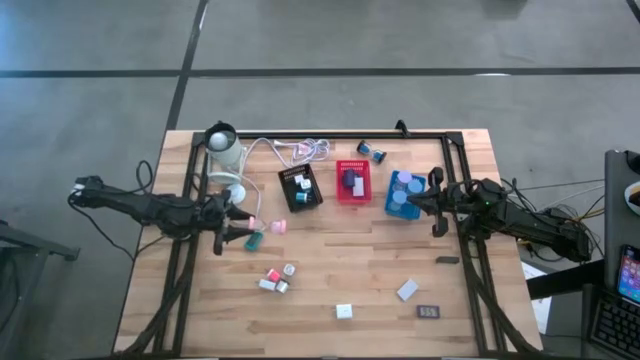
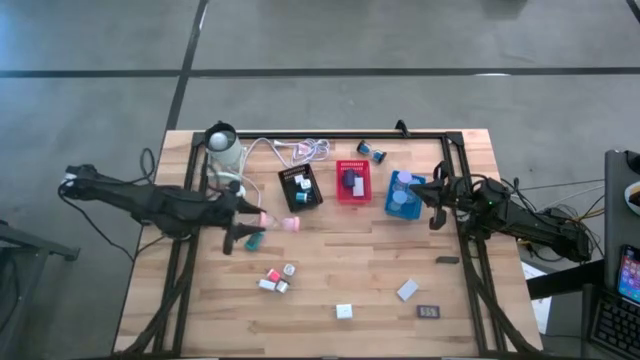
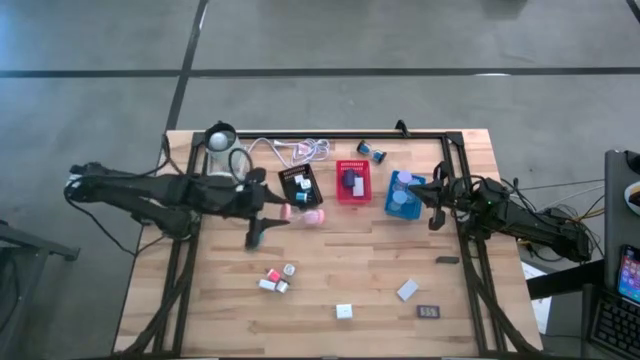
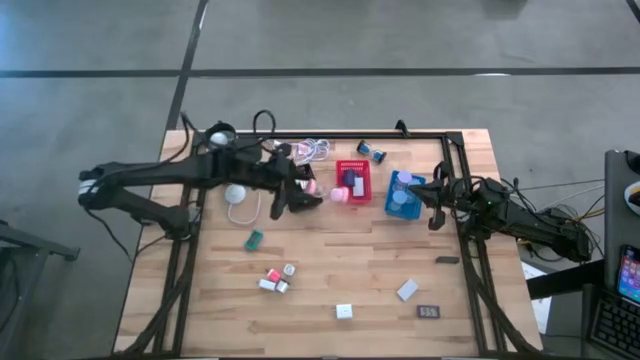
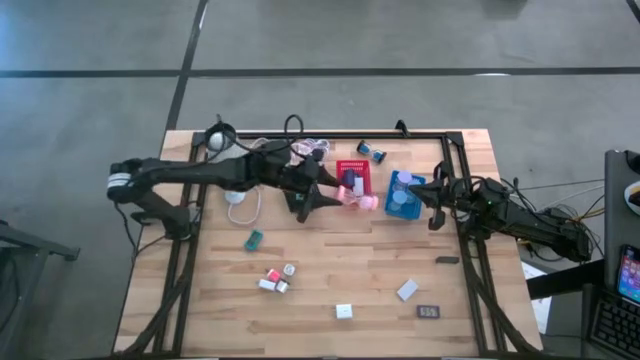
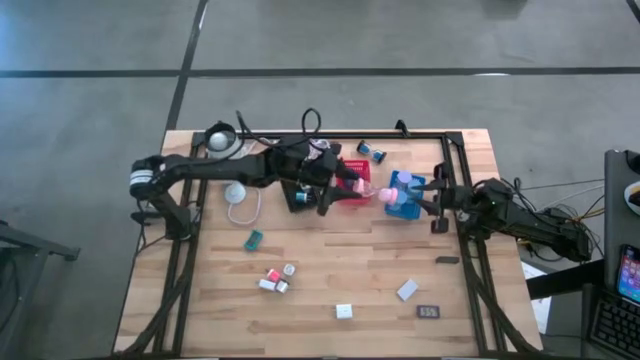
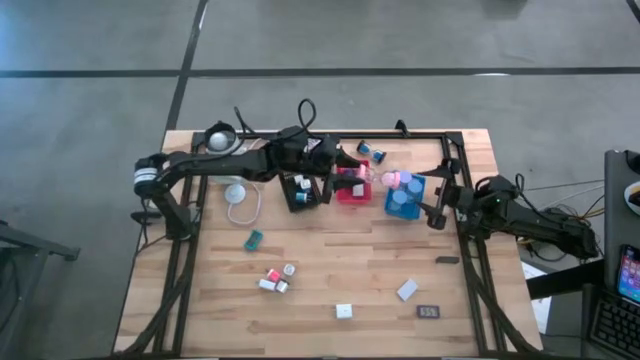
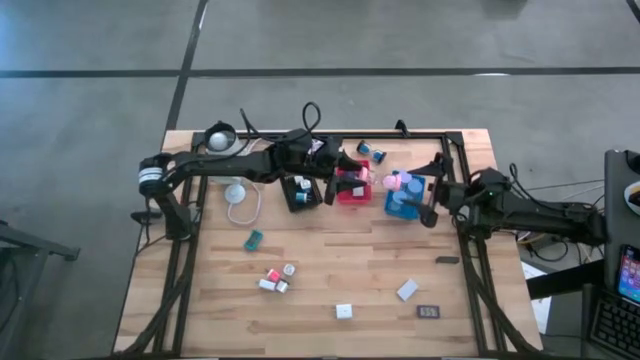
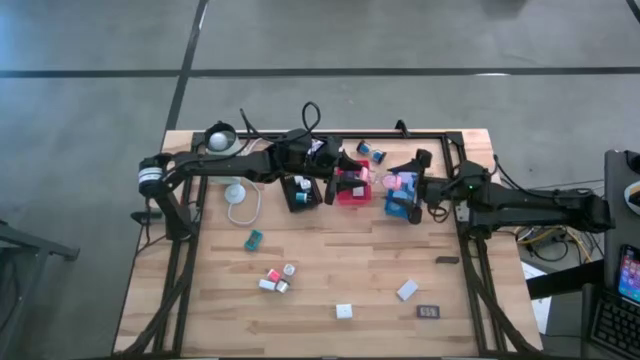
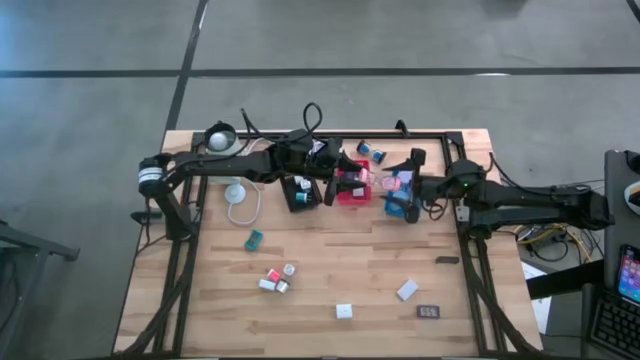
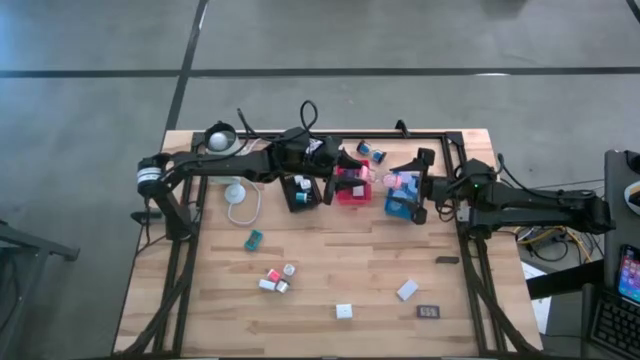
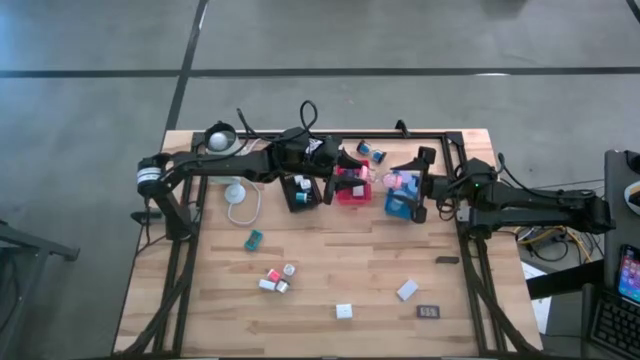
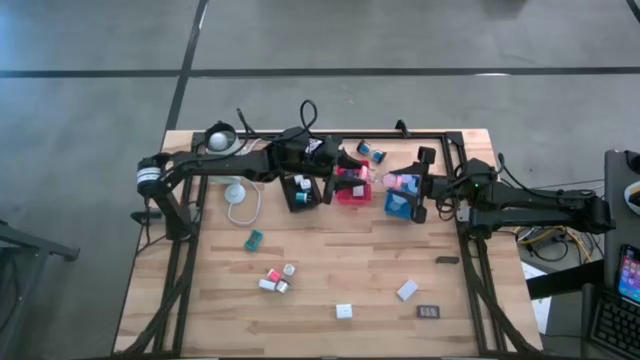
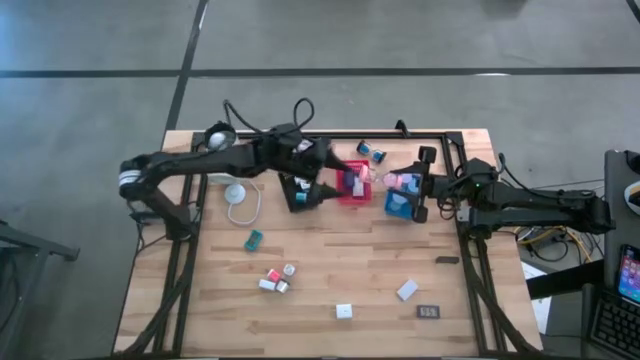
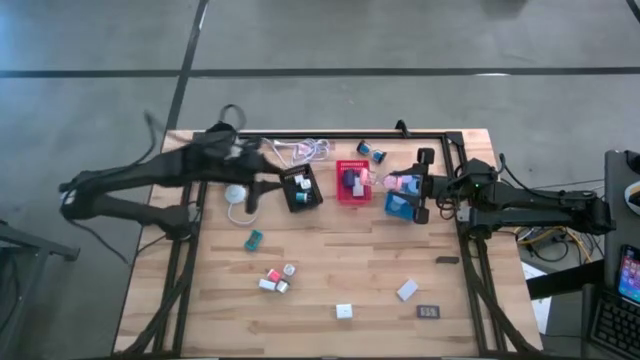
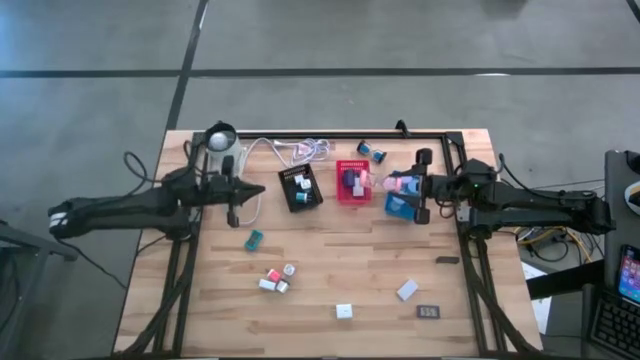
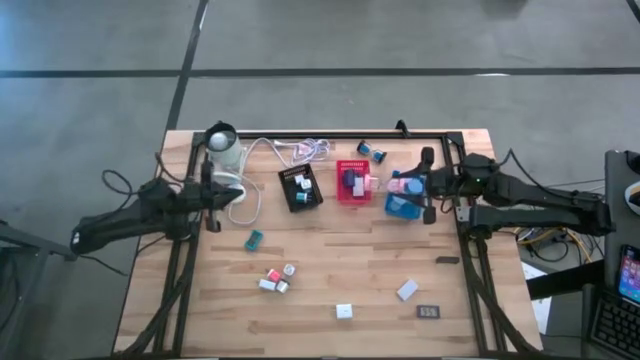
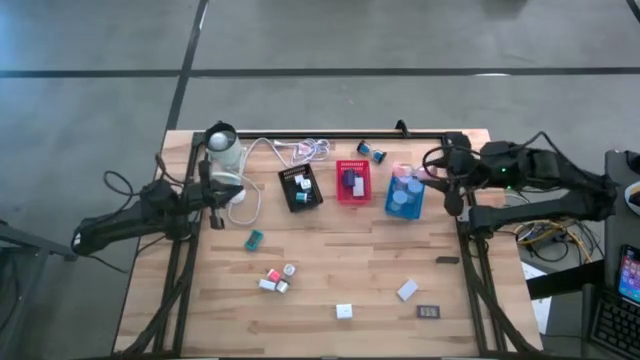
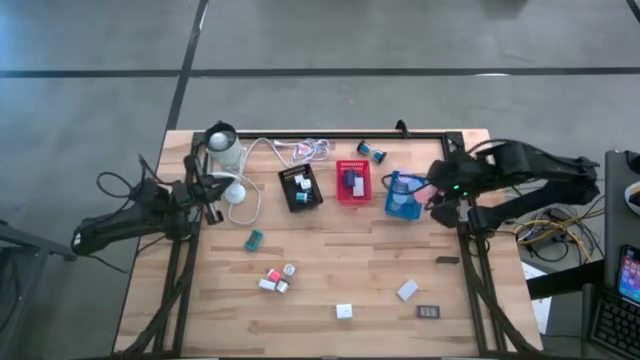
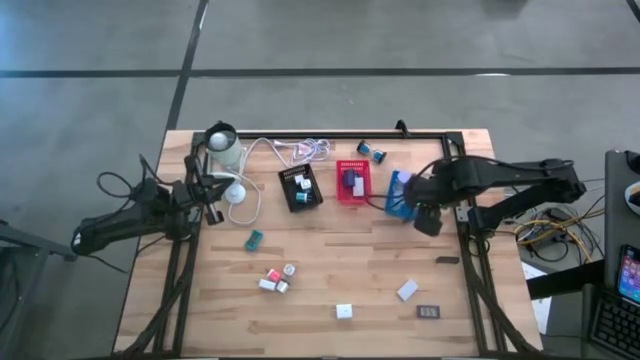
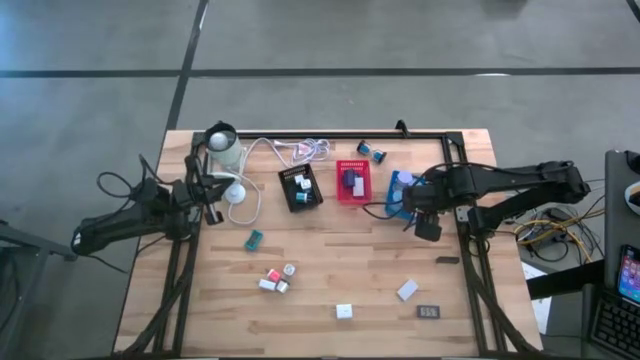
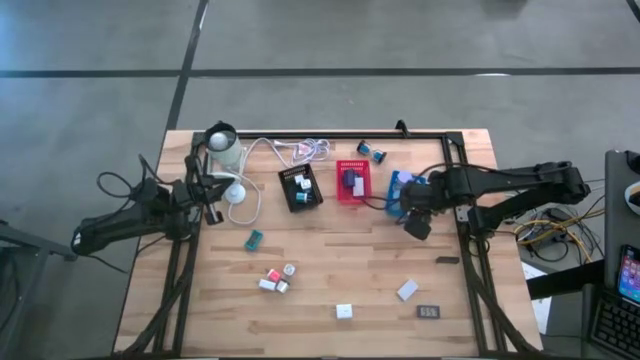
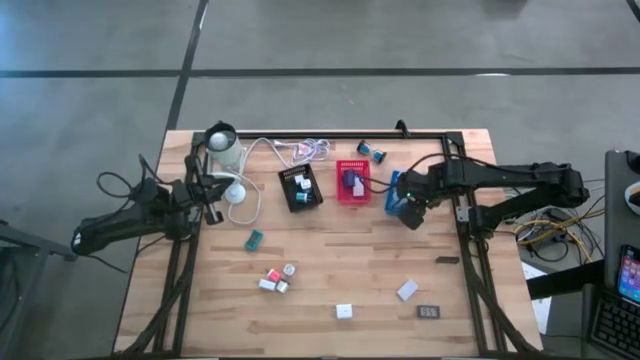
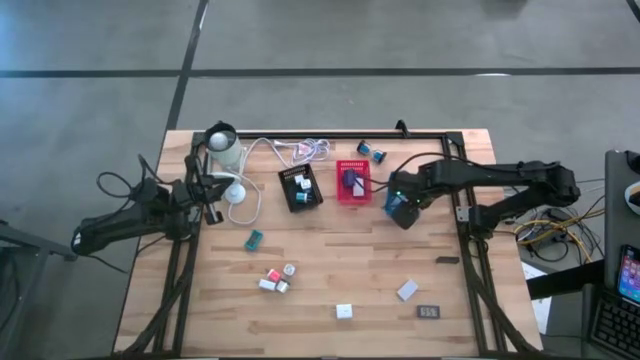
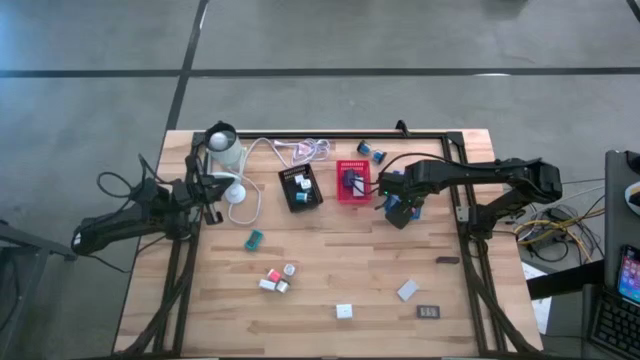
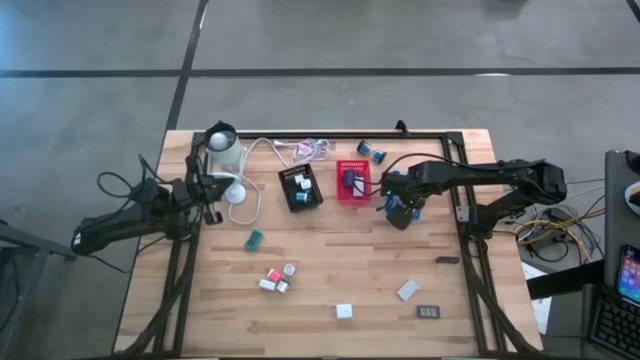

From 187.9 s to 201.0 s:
Task: Pick & Place Office items
Put the pink hourglass into the blue bin

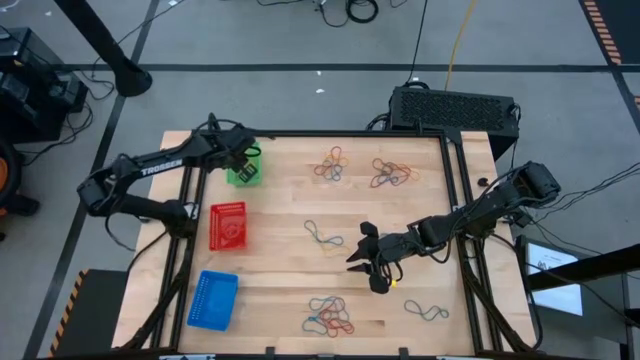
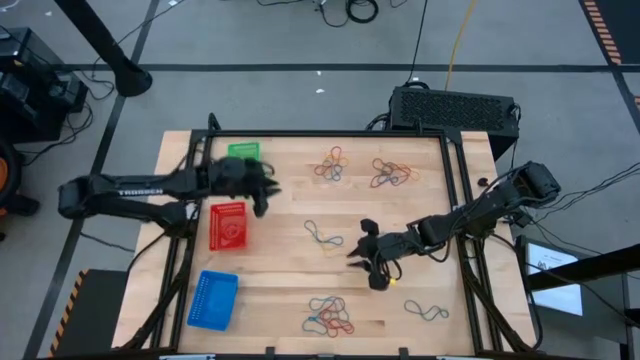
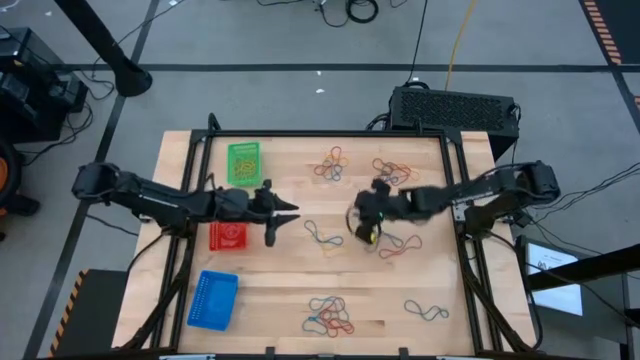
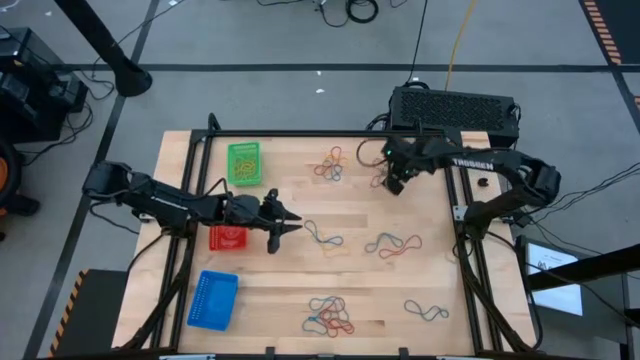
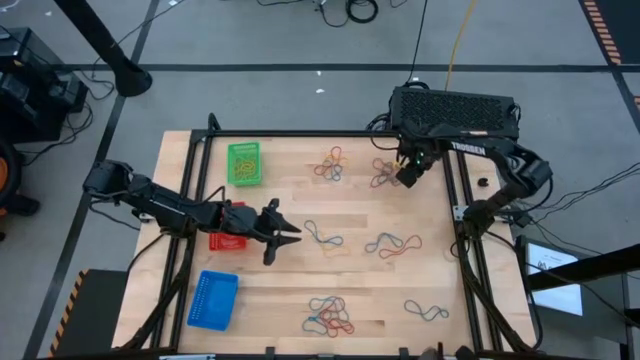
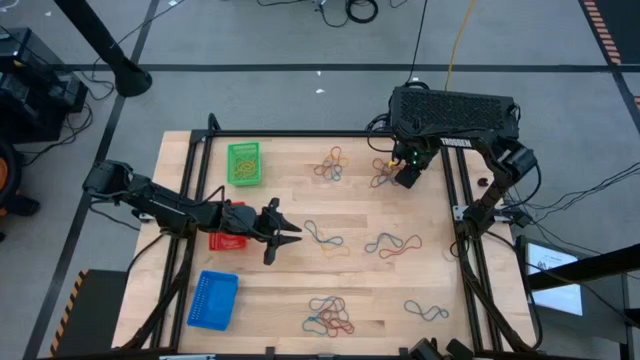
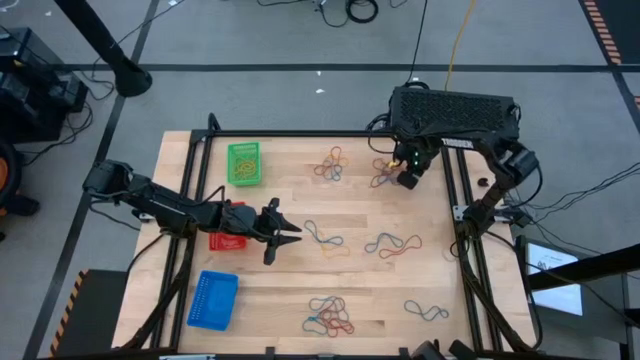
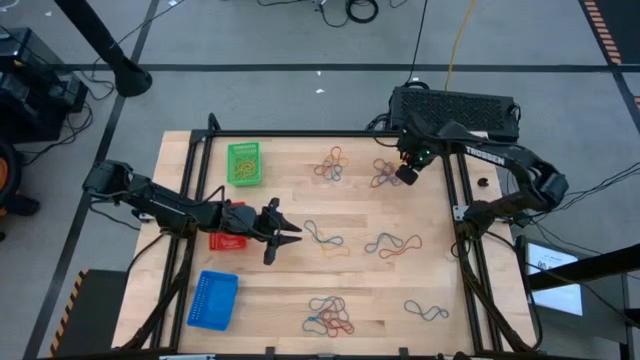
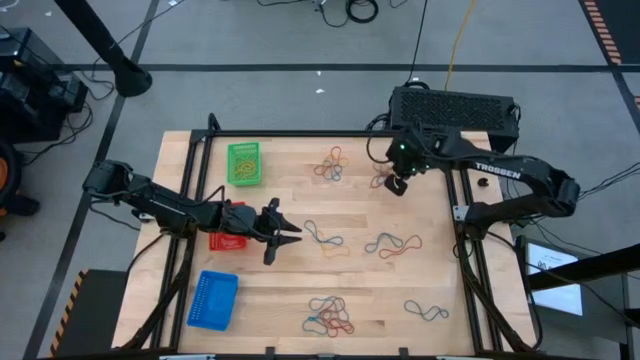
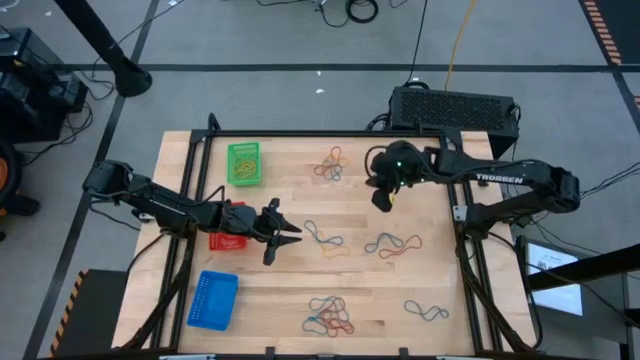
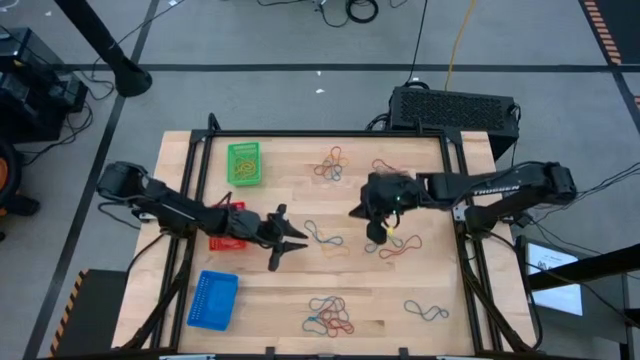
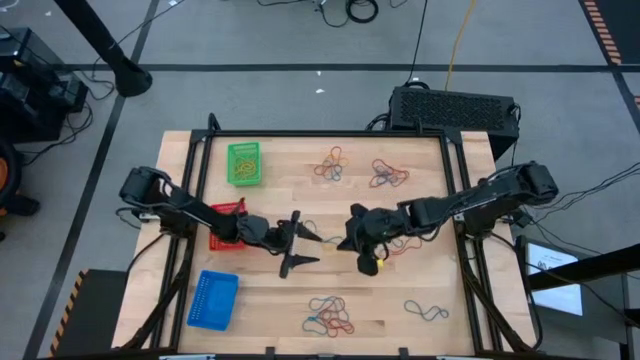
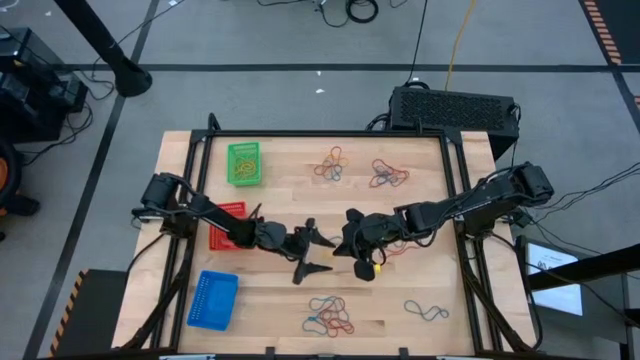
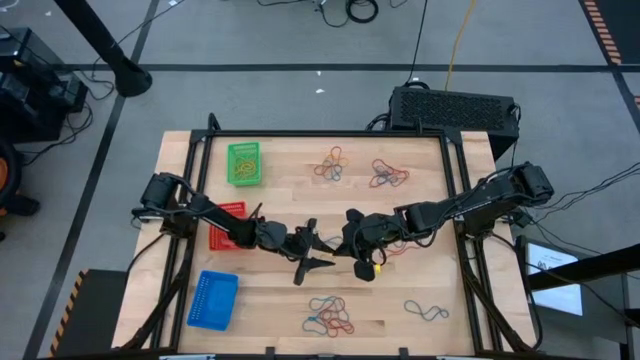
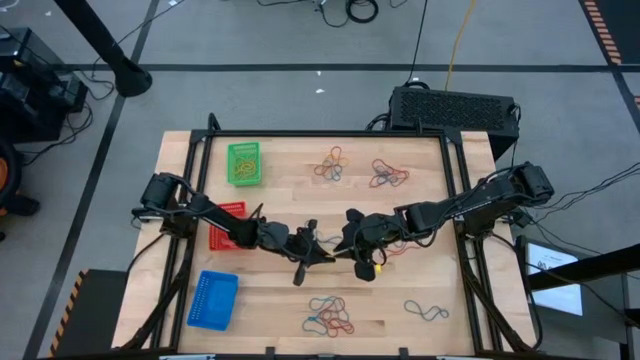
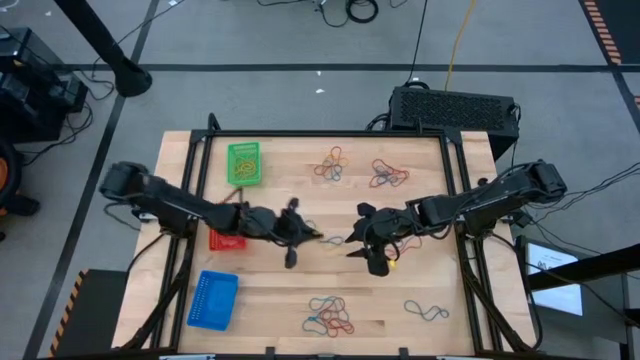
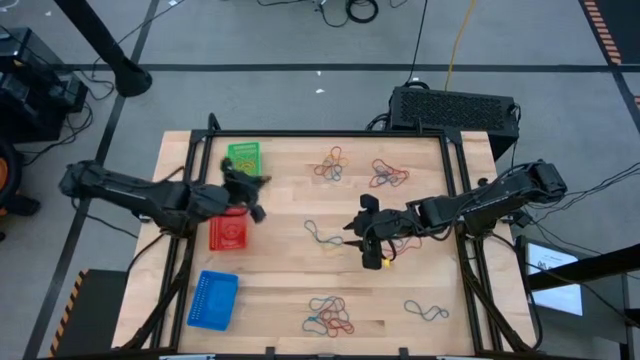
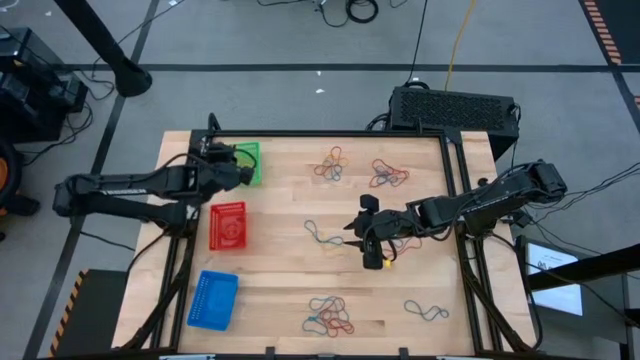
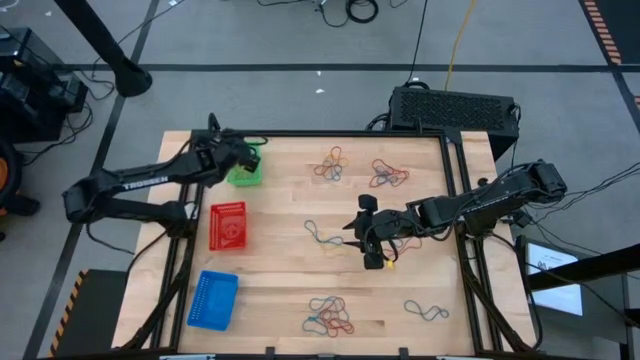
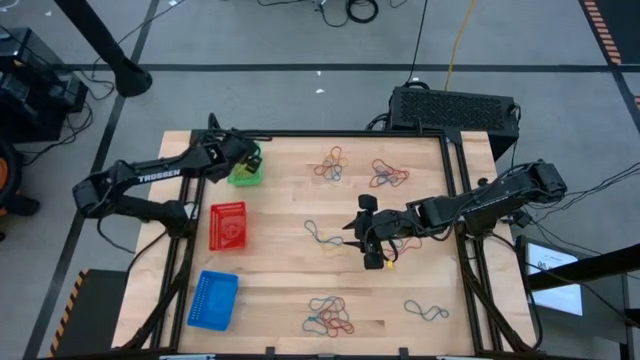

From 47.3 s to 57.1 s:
Task: Sort rubber bands into baskets
Put the yellow rubber band into the green bin
